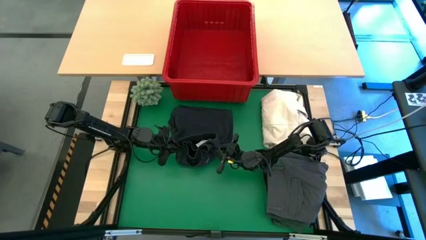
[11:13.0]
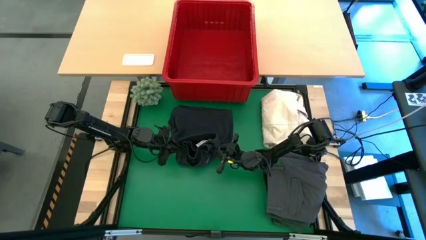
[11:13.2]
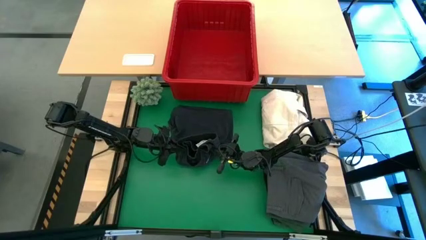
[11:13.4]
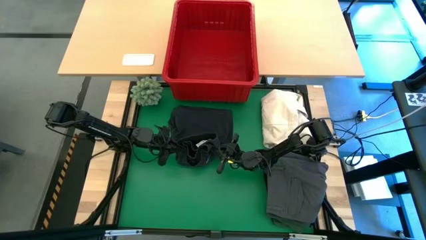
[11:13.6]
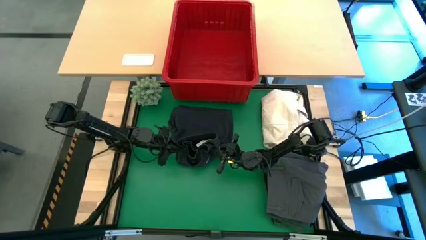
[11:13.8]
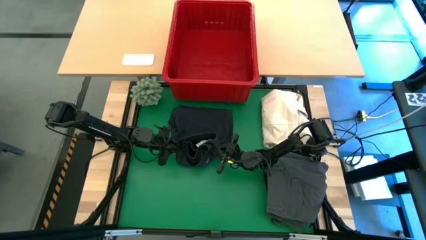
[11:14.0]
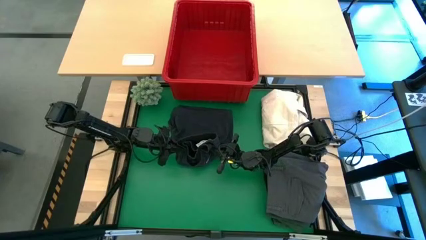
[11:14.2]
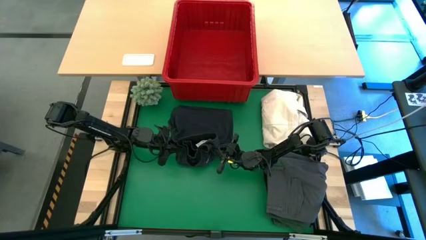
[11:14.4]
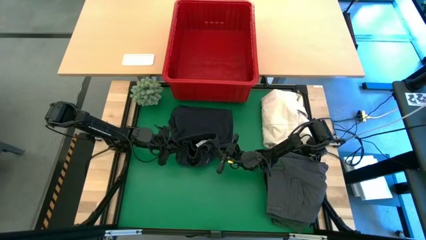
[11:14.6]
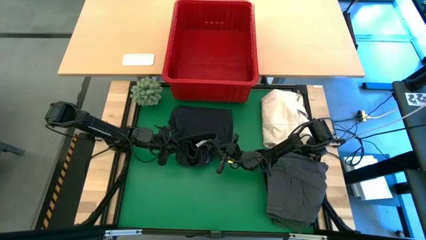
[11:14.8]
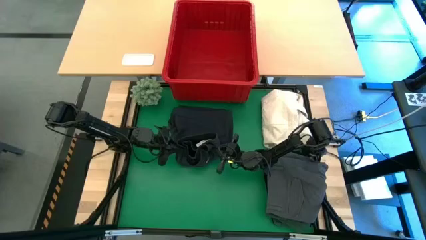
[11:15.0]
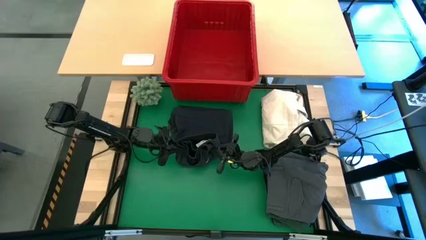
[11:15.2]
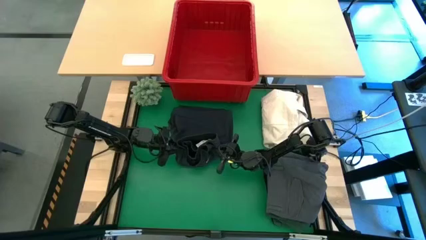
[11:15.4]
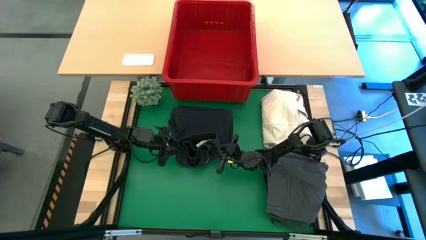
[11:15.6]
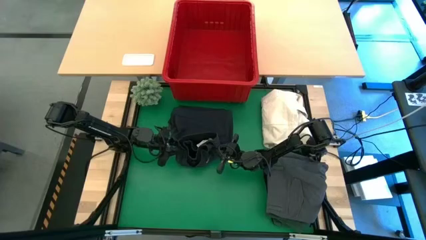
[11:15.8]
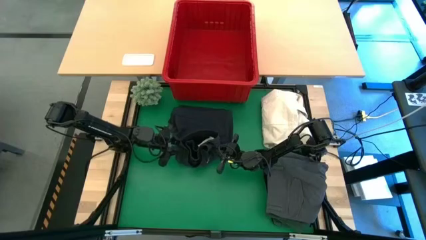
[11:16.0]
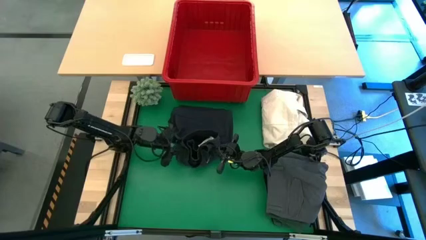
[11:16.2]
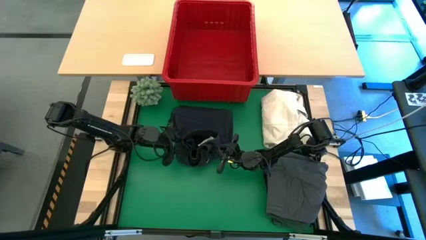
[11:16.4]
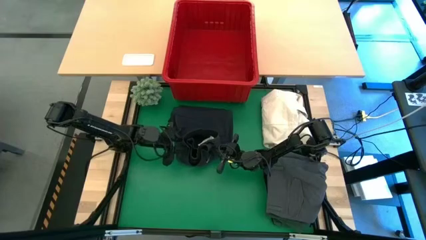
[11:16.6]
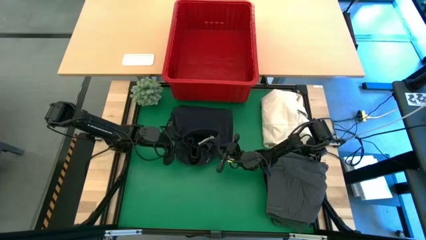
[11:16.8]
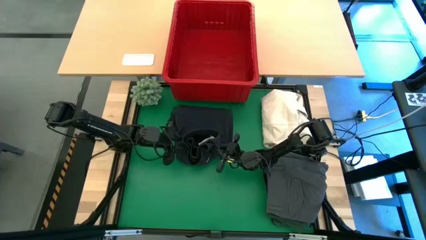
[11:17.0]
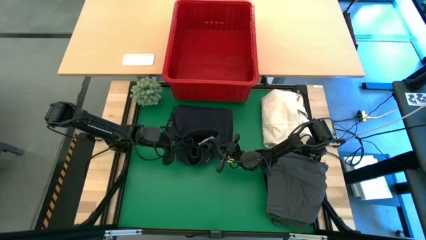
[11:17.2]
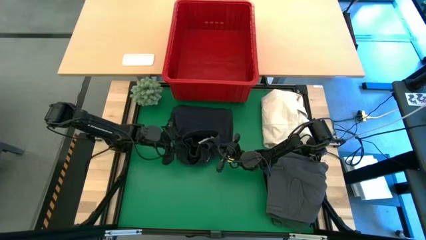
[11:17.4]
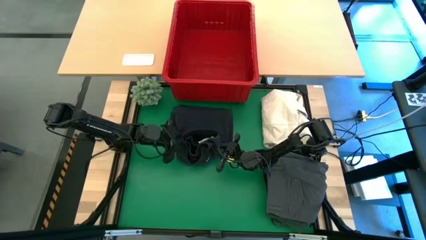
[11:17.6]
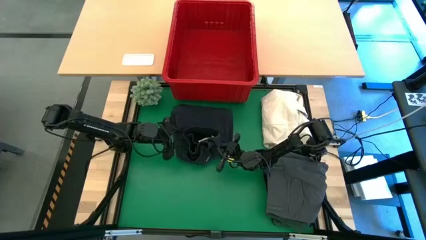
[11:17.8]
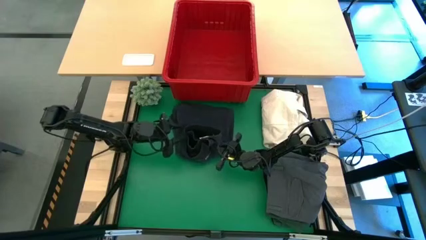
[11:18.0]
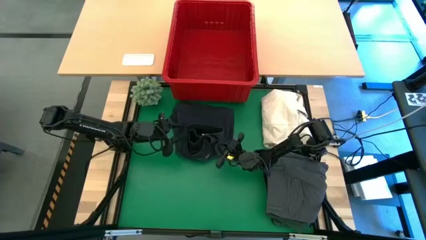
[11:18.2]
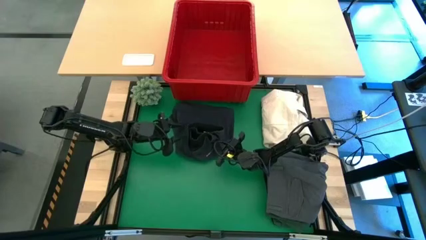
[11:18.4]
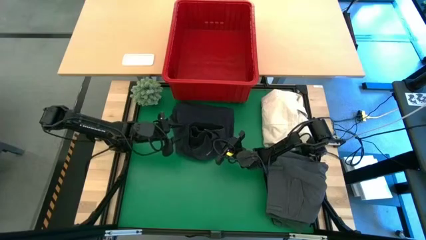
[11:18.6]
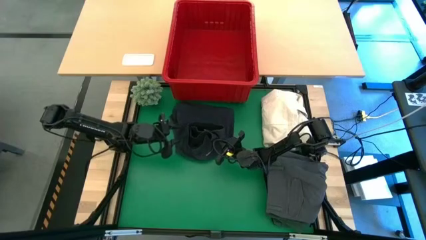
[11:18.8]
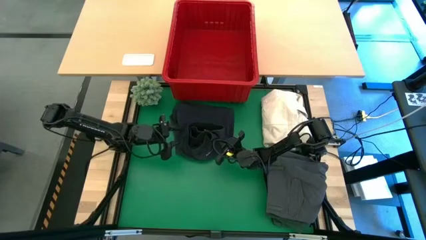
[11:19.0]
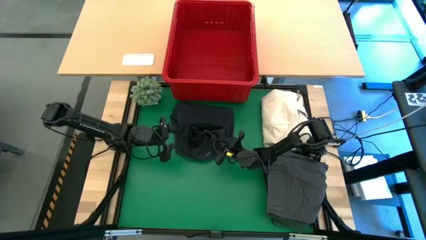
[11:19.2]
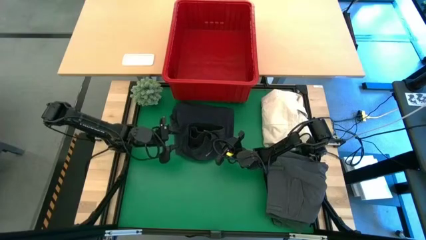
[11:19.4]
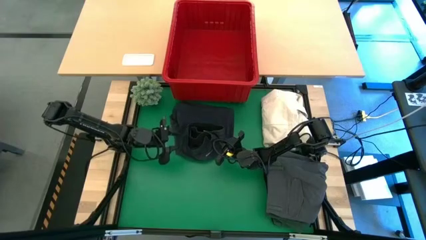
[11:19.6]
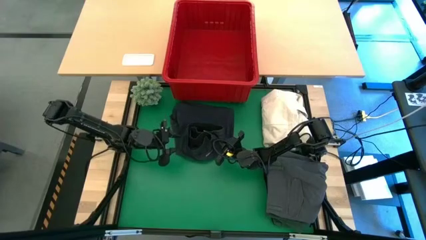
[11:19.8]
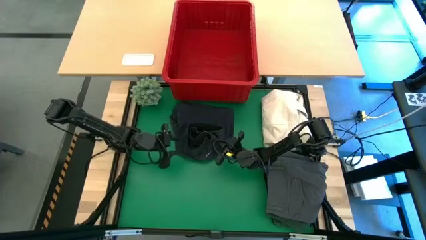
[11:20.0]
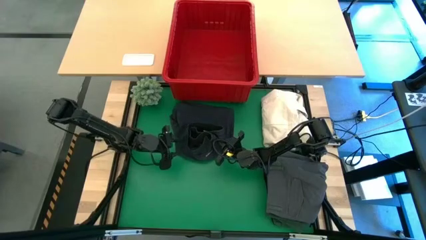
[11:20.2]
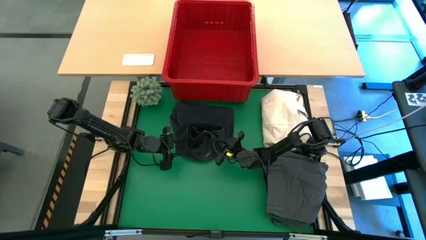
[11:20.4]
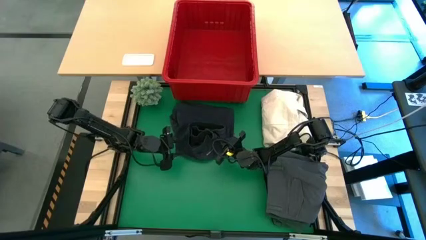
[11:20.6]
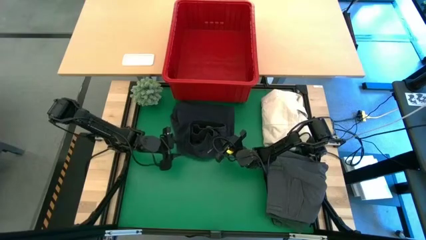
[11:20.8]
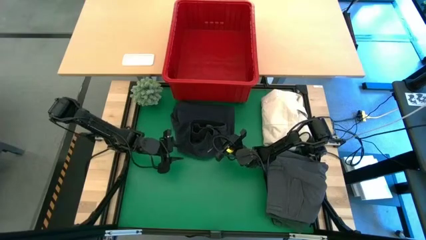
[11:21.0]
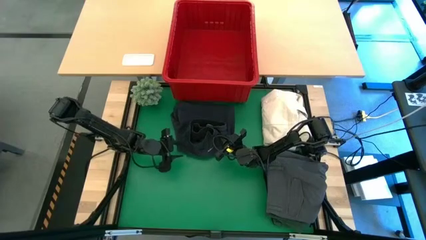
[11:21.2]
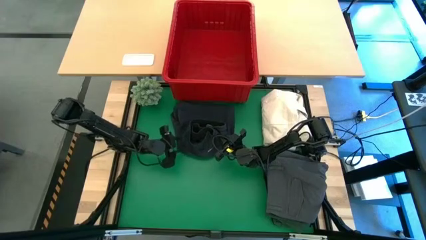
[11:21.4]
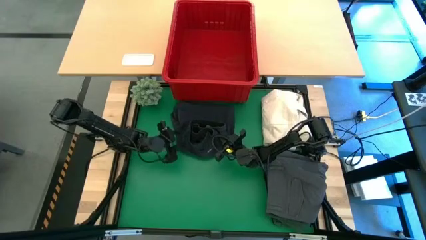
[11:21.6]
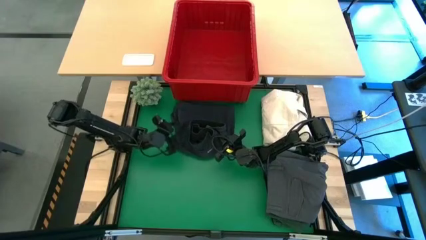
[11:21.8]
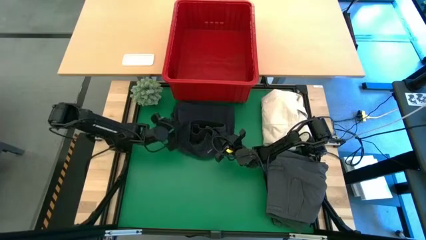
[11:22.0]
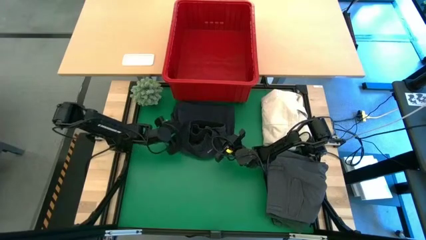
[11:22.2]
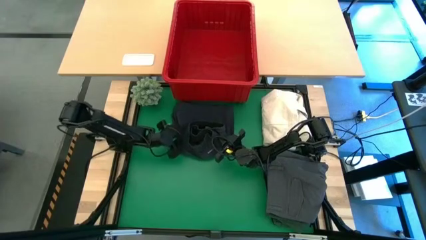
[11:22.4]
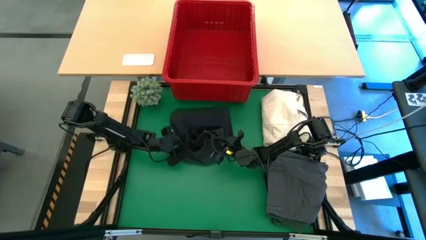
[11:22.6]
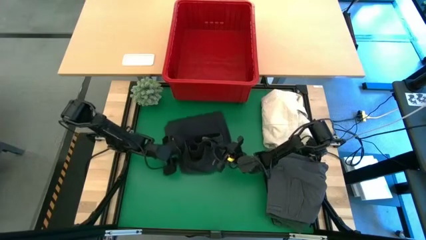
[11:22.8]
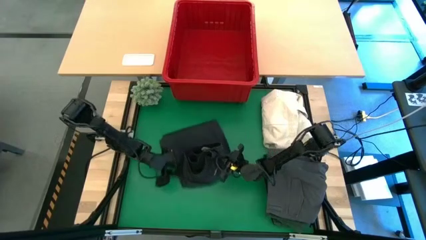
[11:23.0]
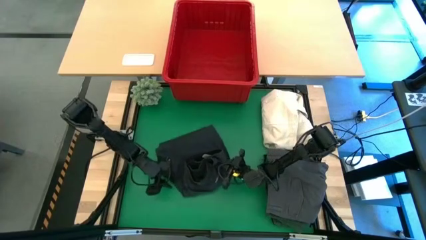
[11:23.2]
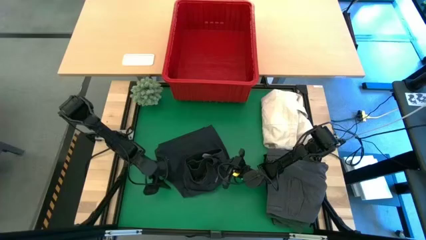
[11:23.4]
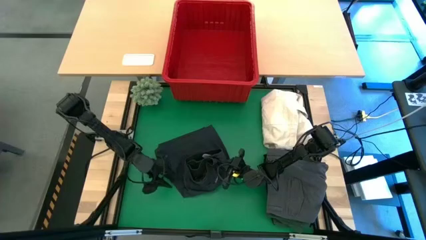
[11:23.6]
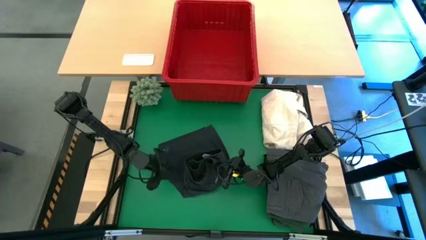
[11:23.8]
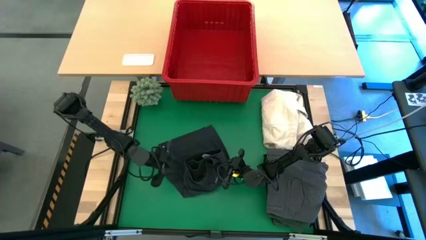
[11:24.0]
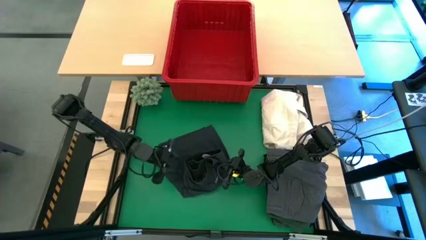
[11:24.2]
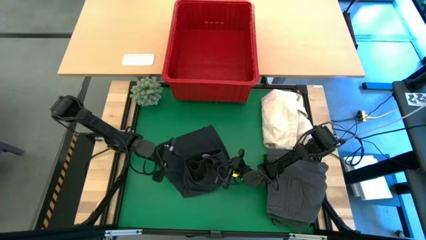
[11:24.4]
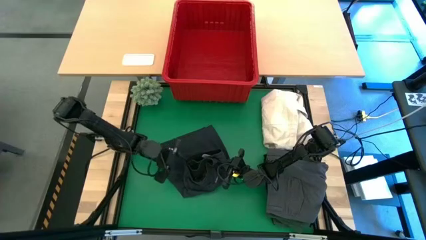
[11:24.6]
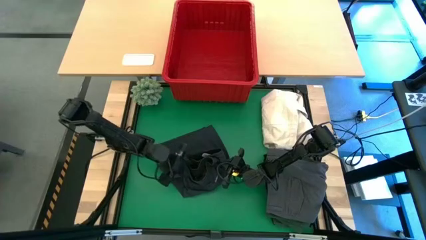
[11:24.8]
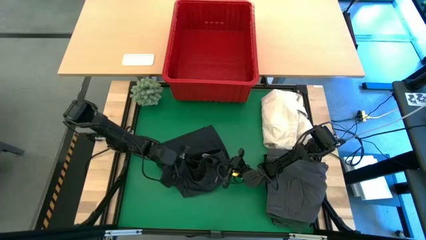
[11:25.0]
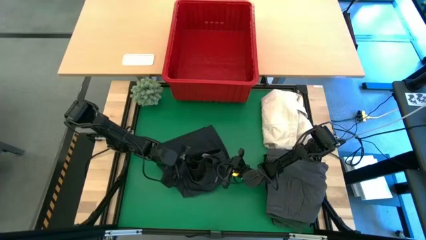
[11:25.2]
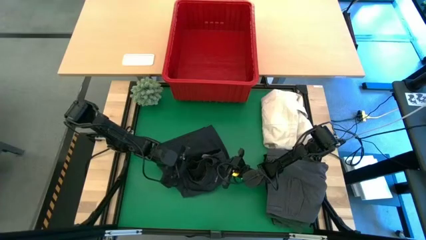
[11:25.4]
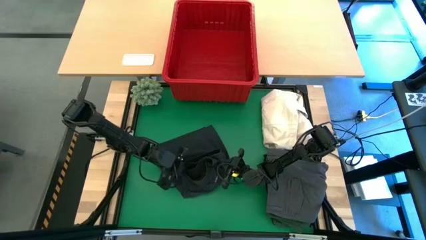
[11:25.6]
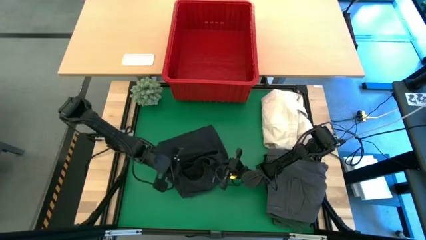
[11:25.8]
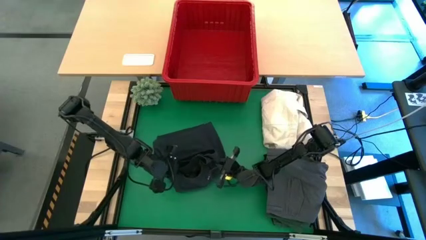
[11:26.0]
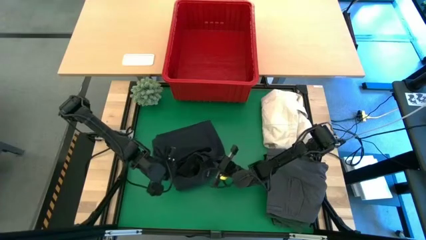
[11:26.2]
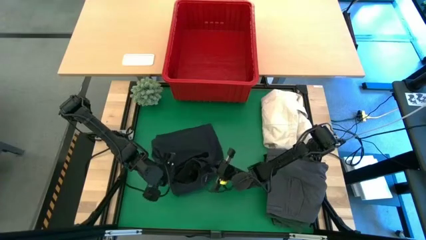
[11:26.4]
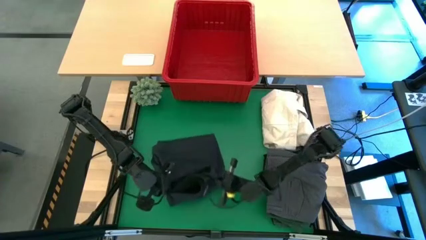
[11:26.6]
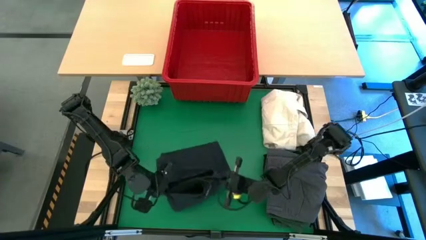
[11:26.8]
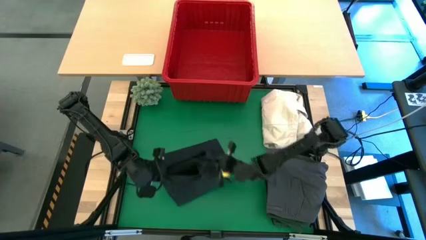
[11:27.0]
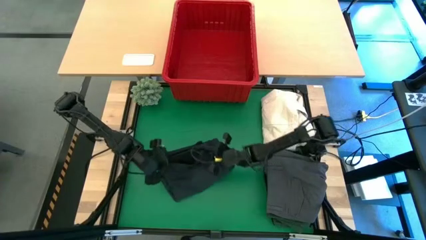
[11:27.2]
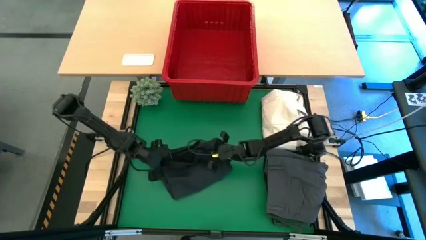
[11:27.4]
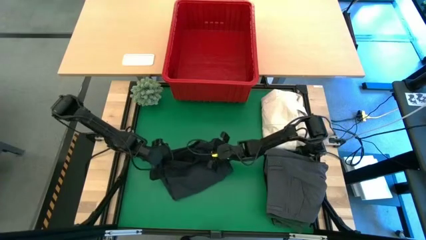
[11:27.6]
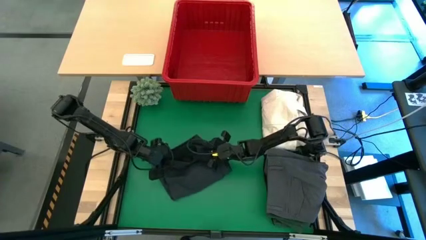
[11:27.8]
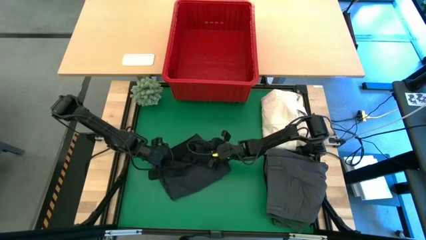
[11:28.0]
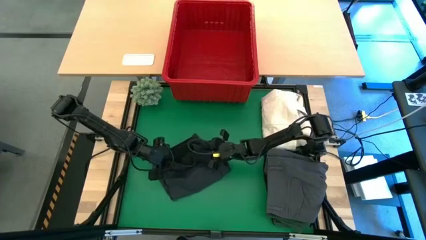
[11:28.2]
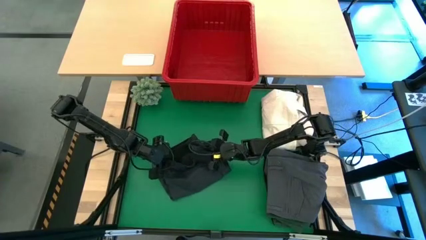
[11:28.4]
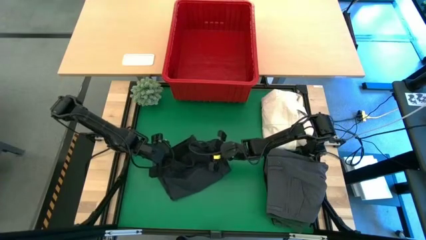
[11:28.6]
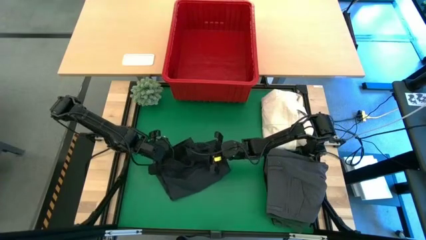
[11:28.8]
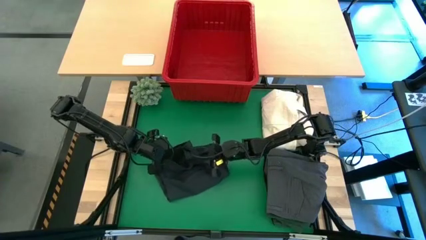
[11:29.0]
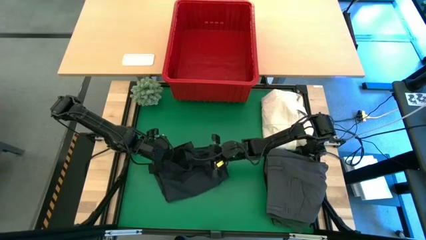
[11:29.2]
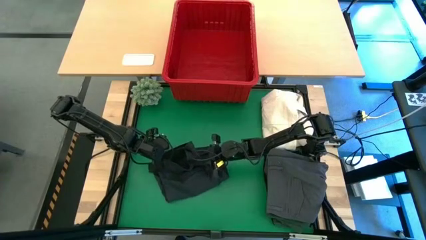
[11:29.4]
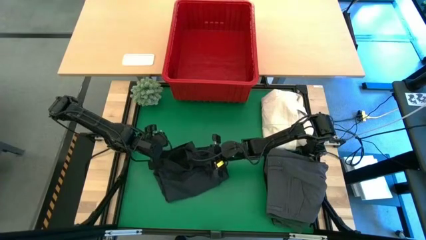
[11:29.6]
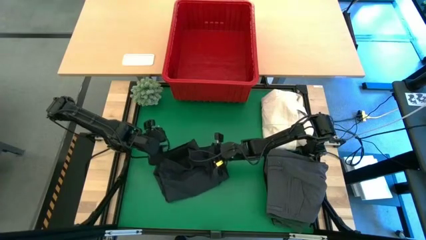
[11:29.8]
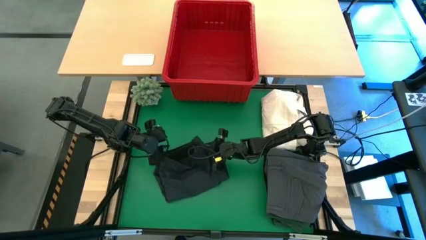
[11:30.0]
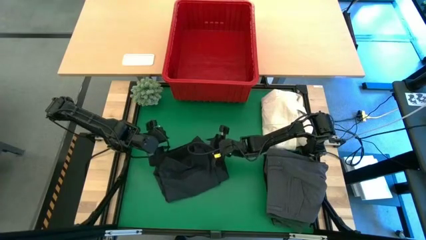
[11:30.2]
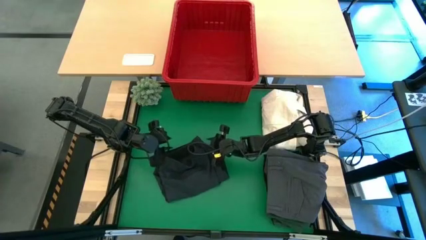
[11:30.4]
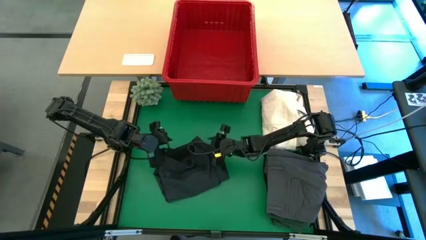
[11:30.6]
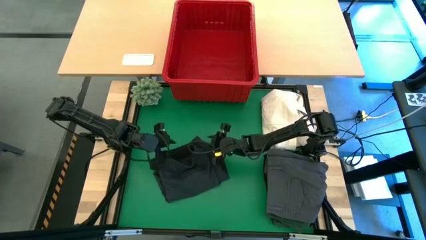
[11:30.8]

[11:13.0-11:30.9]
Task: Fold laundry
Fold the gray short
